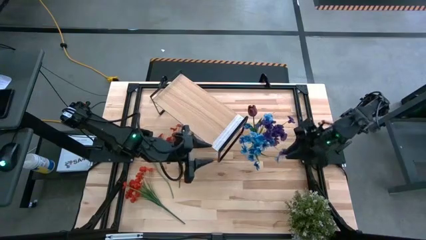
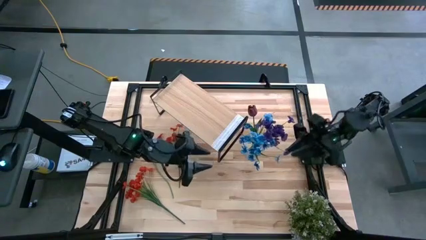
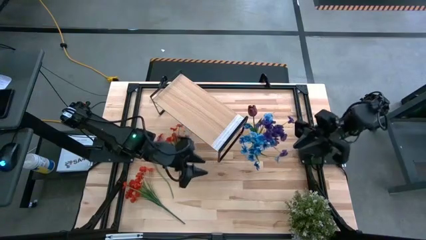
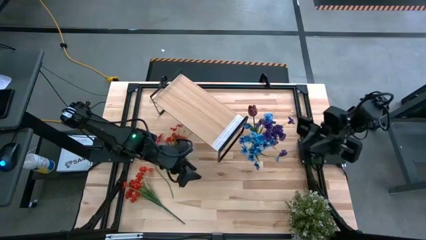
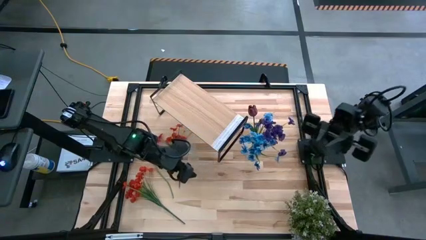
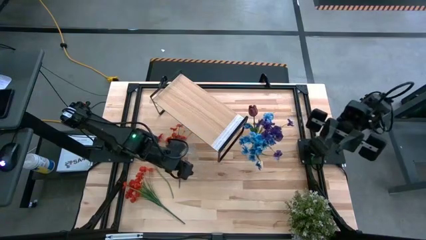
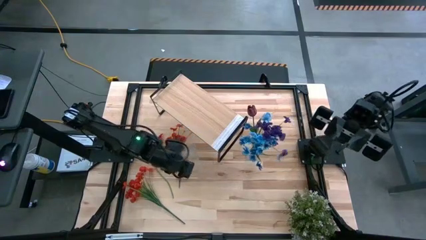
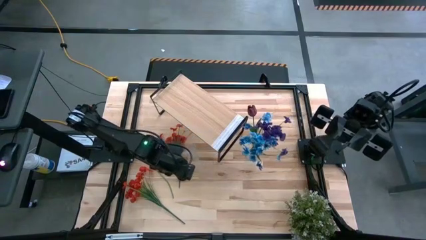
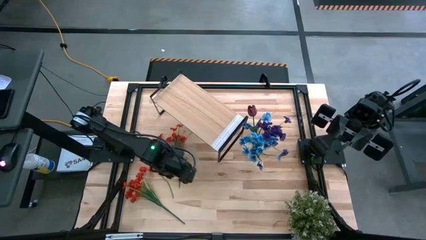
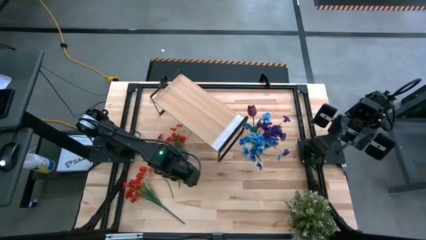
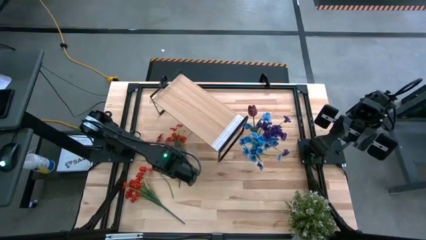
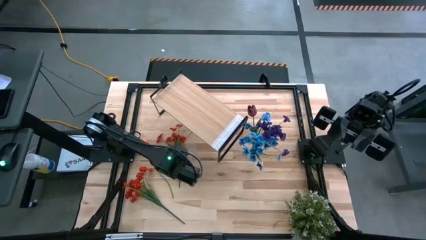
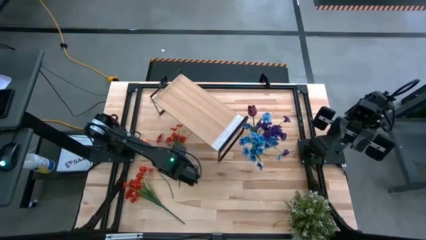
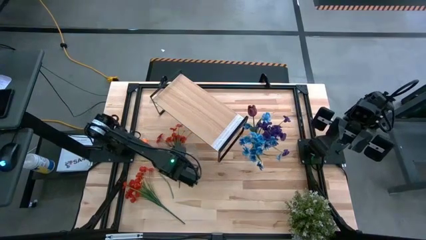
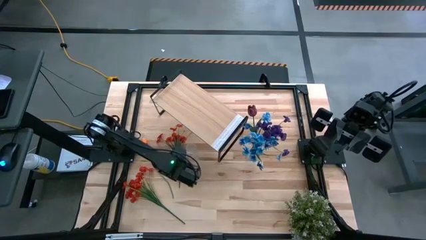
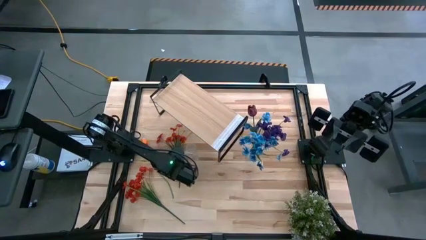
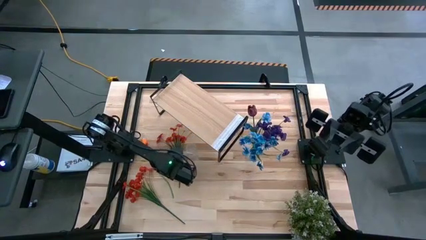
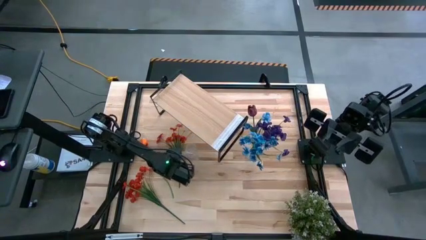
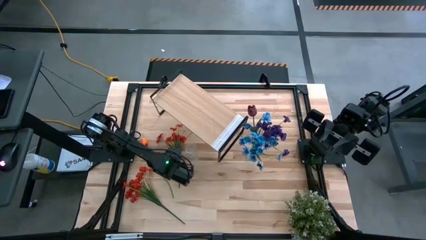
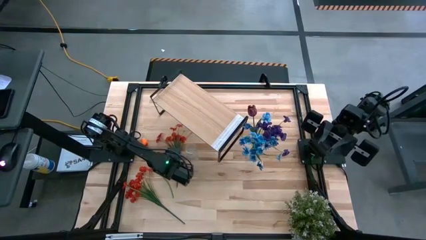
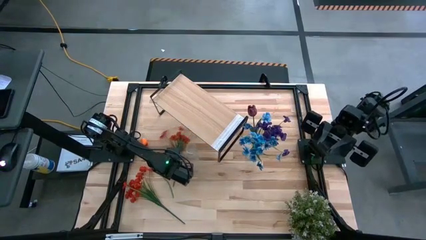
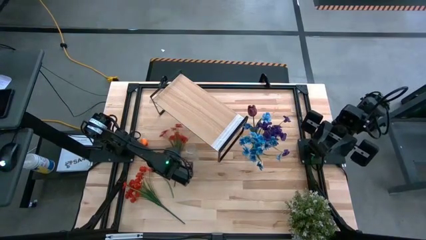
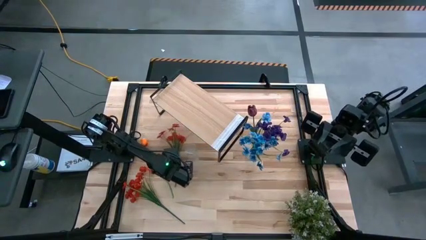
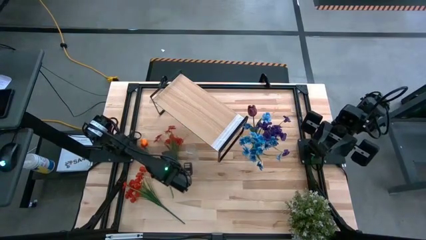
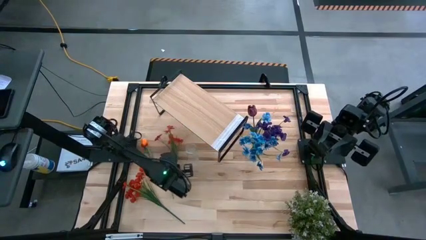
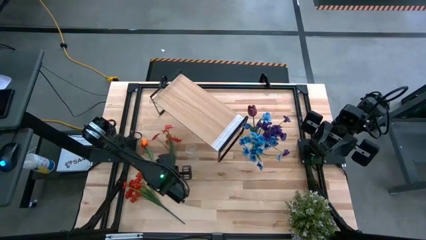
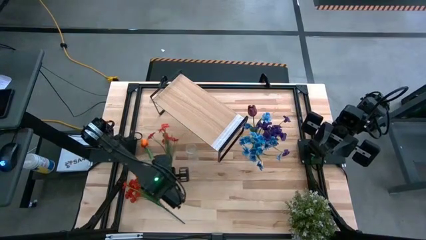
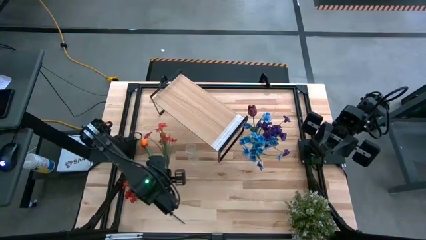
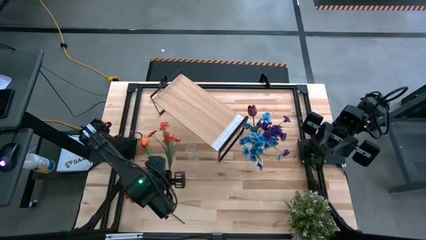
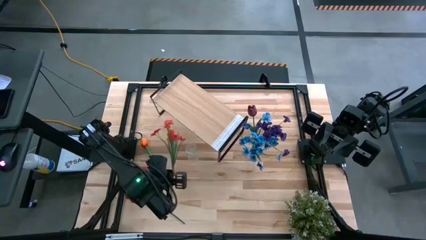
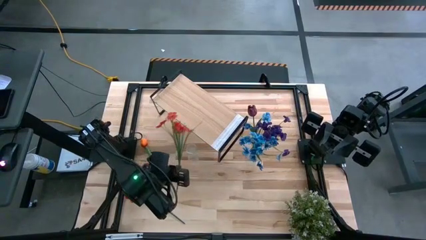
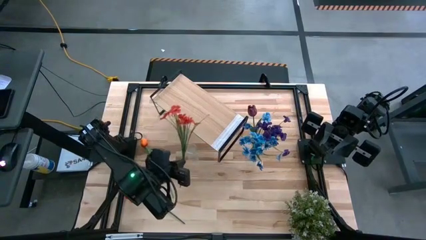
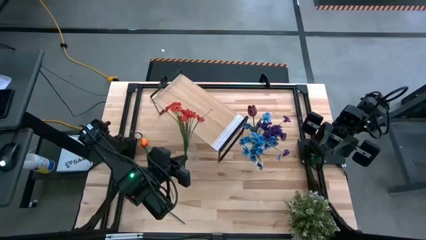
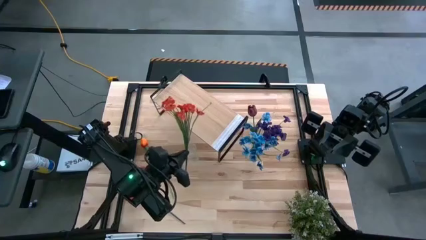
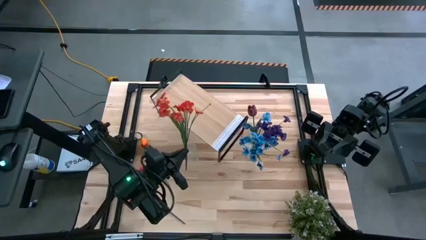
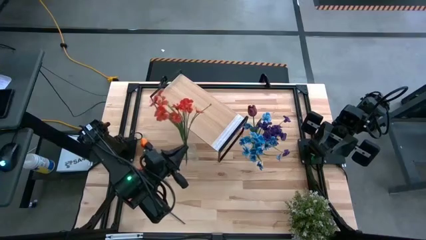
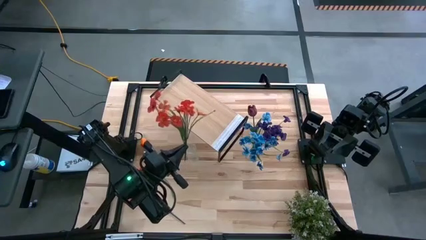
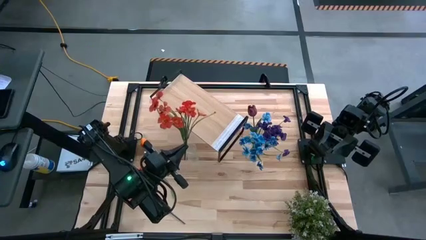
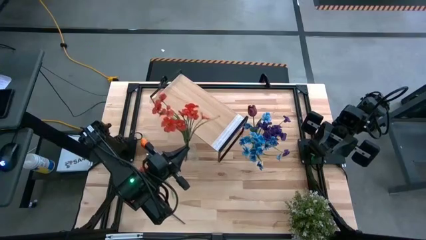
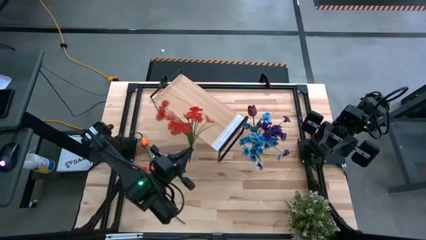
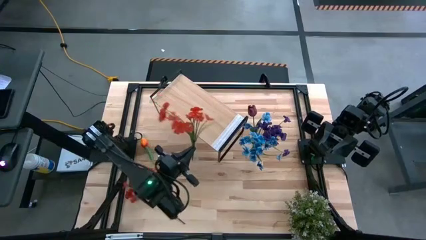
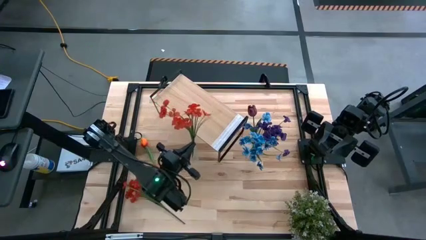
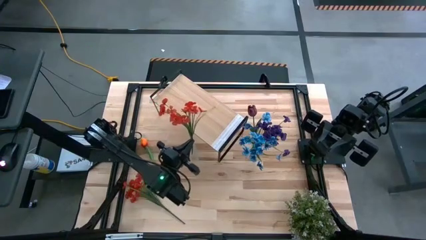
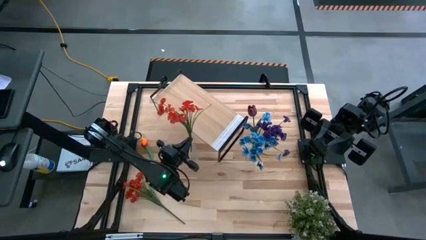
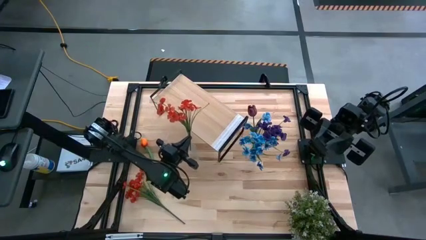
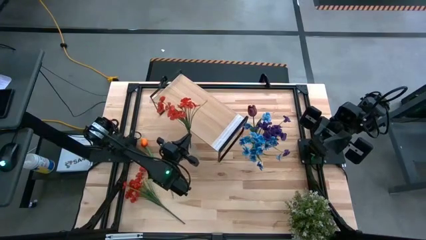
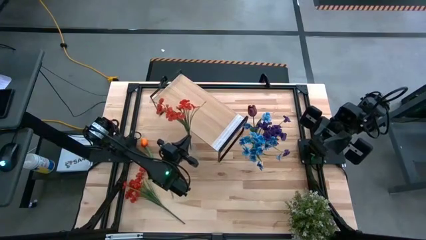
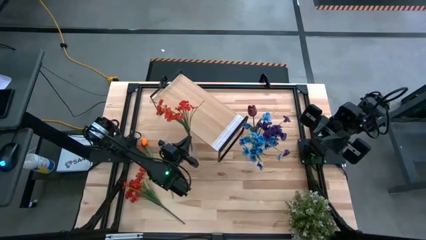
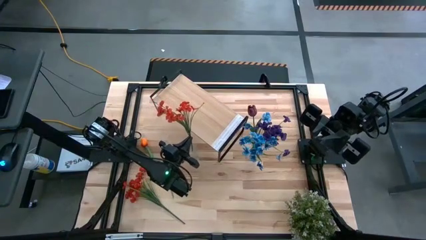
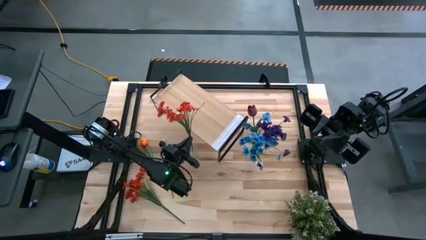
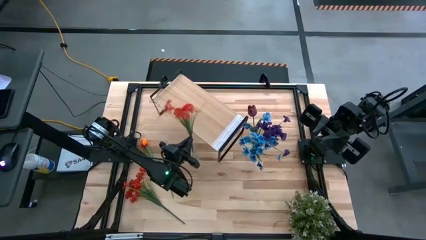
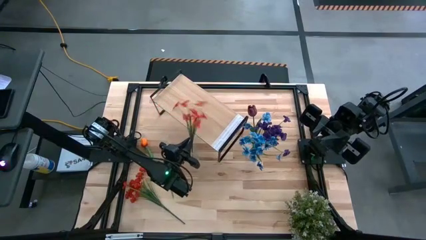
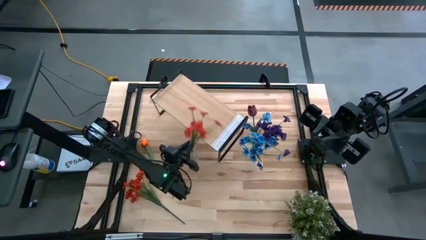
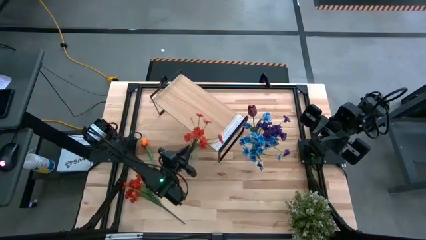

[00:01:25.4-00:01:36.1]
Task: Pick and place flowers into a vace then onto a shelf
Put the top red flowers into the left transparent flower vase

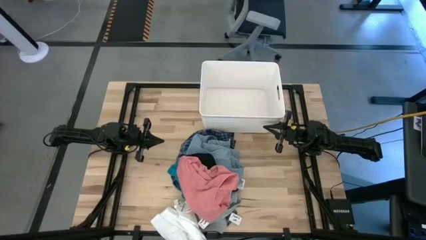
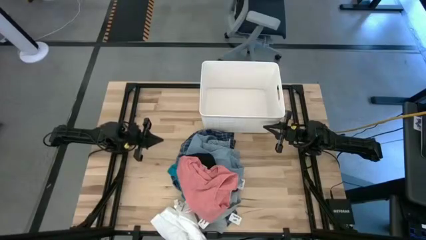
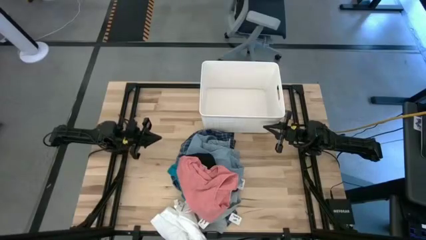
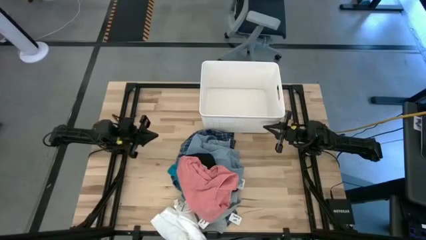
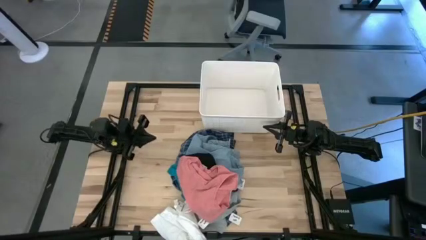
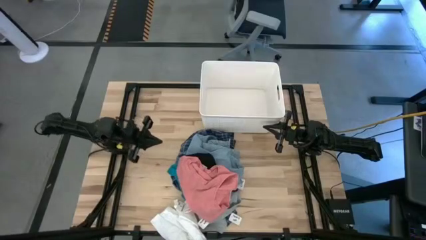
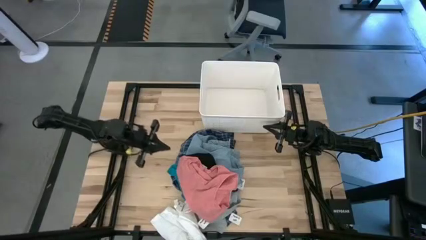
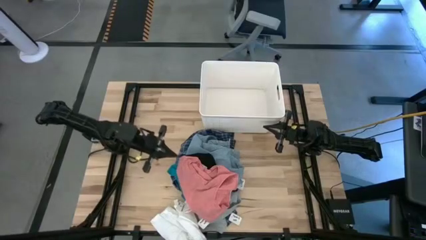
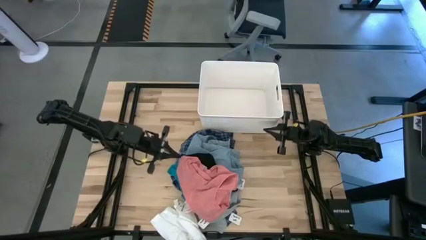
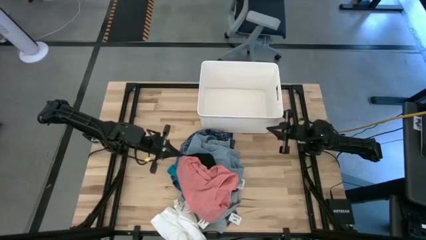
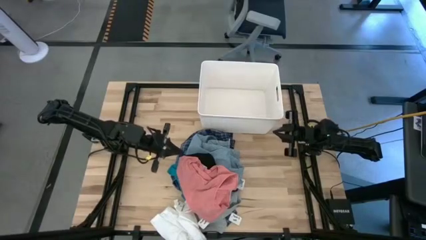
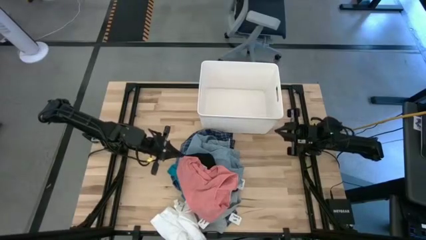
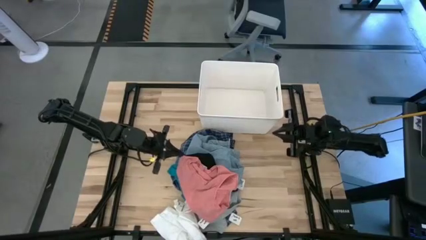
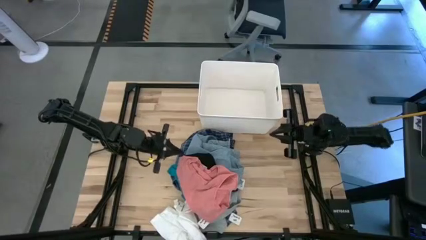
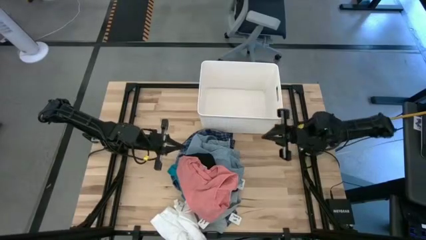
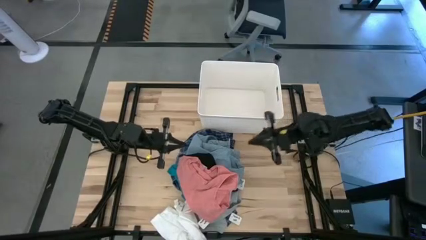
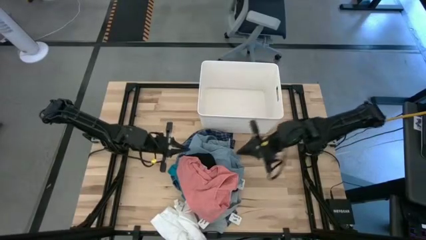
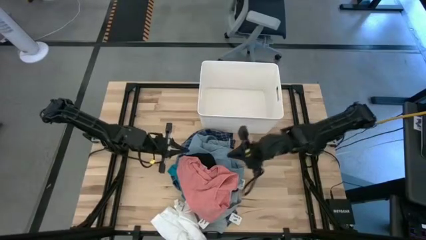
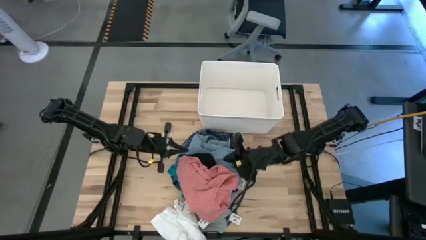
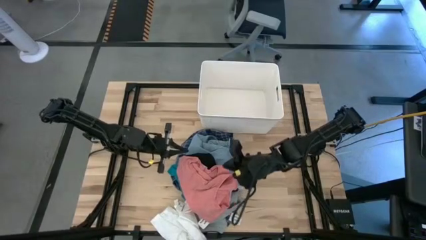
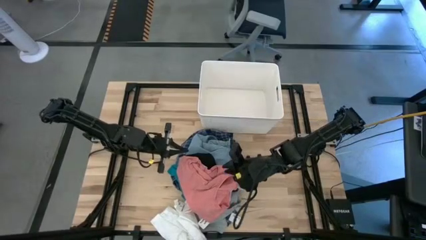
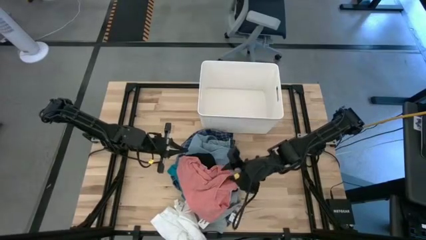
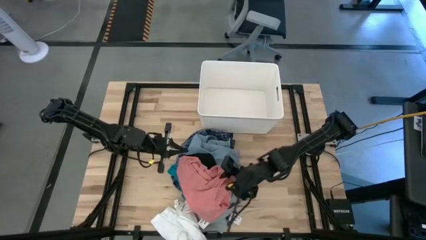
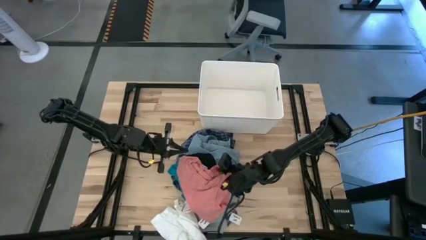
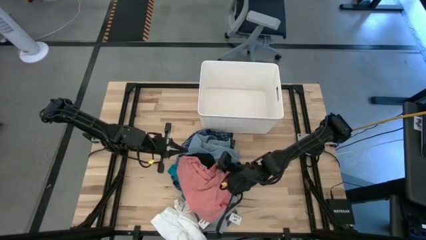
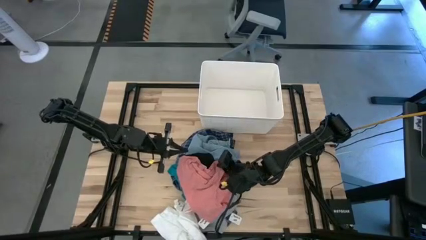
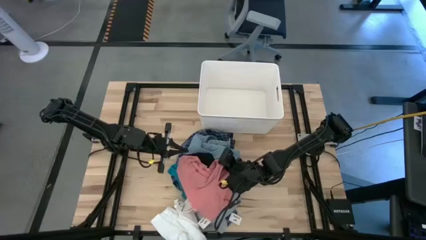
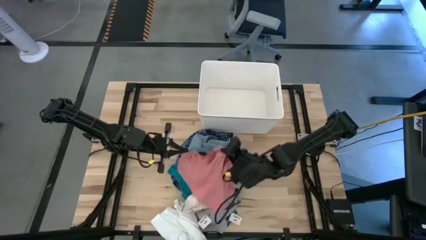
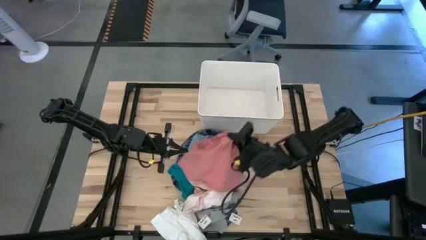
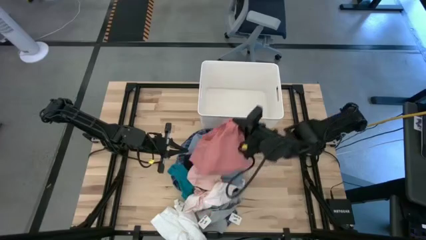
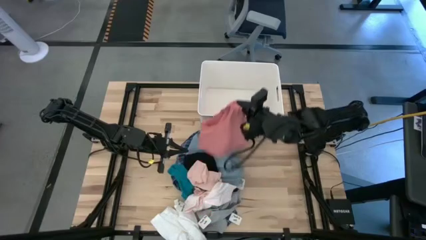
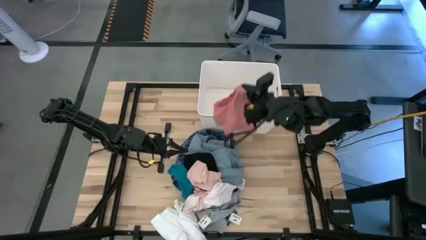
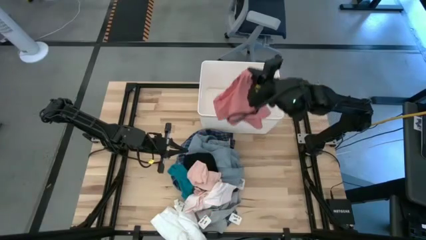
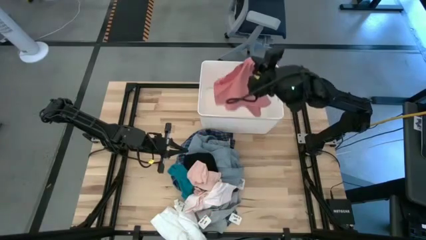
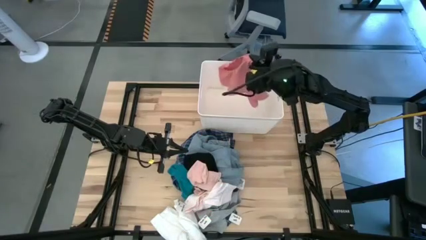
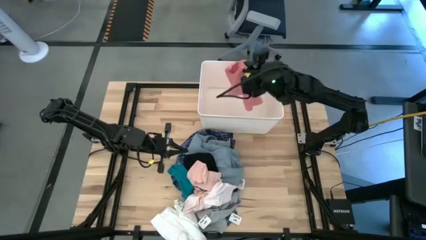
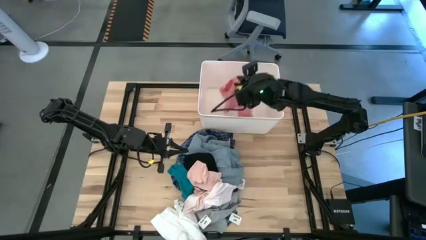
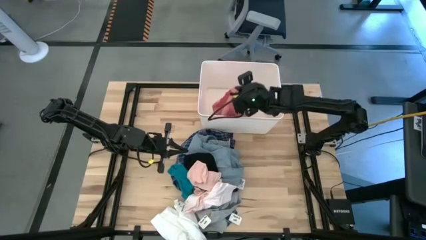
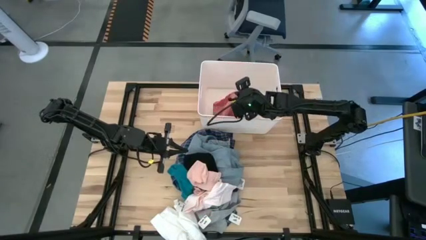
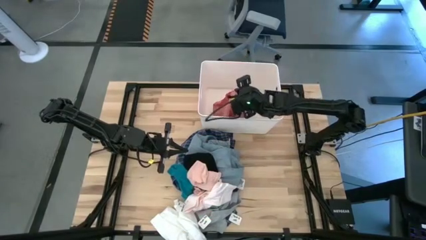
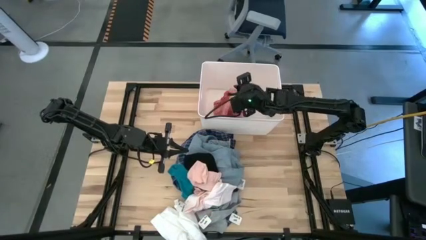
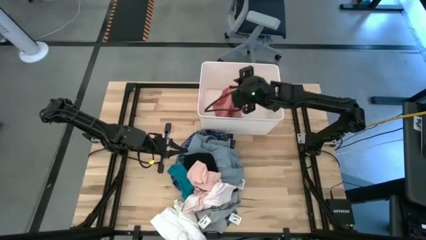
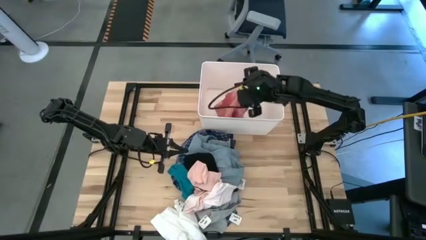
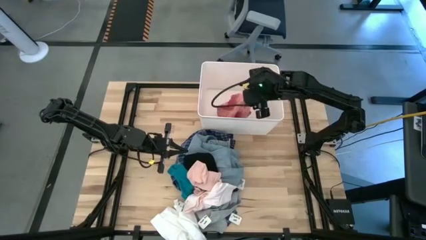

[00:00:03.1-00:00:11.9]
Task: Sort clothes
Put the pink shirt into the white laundry bin
